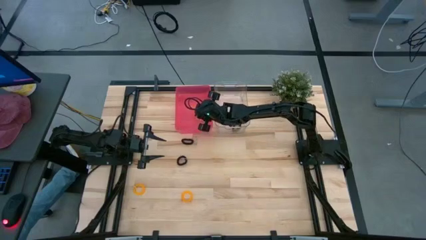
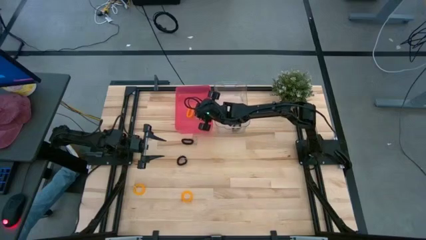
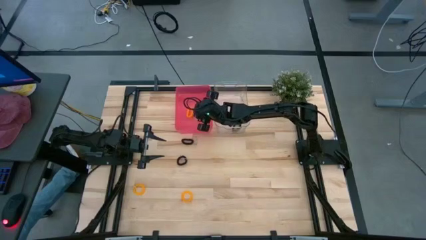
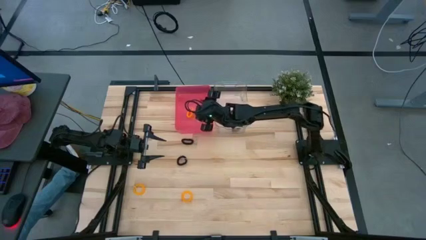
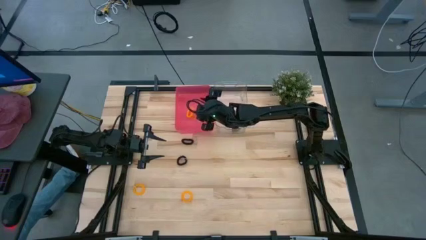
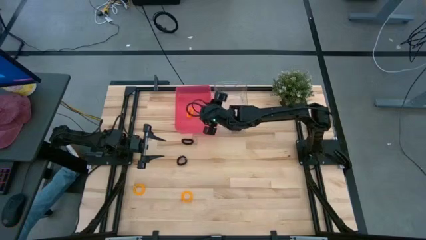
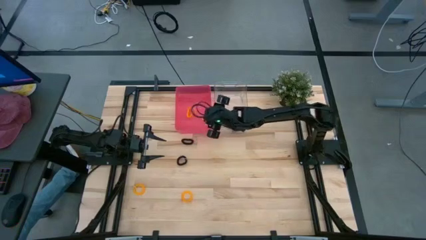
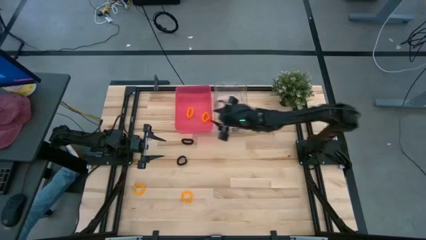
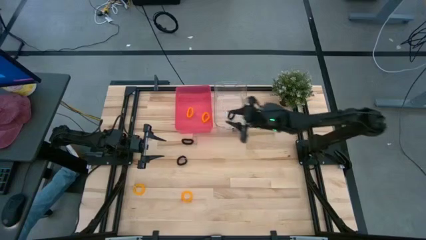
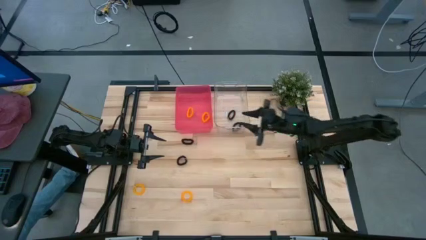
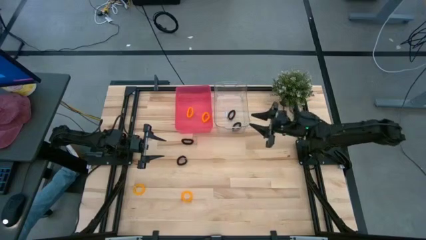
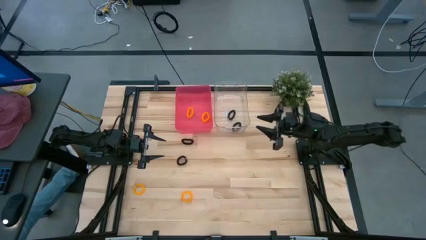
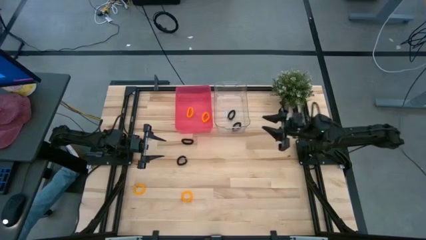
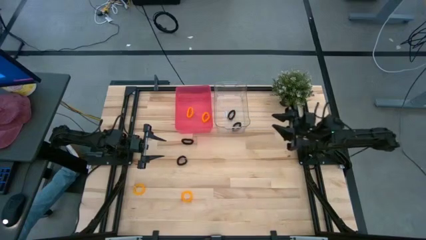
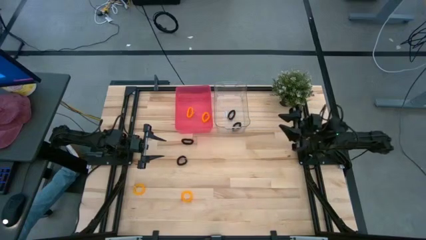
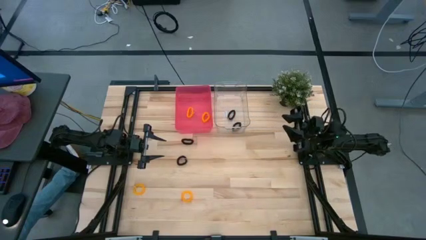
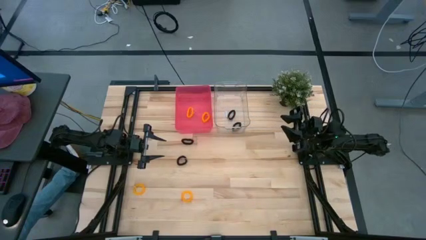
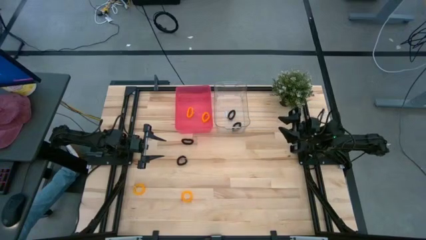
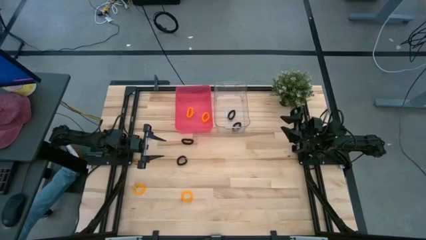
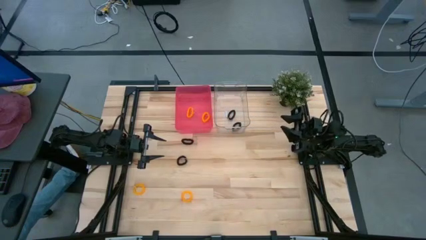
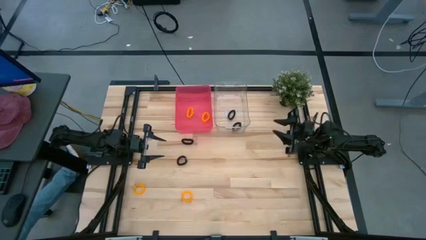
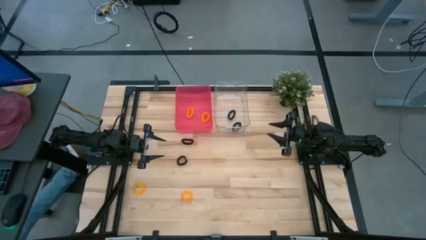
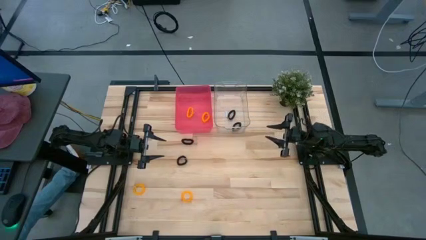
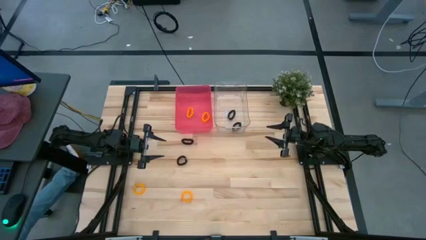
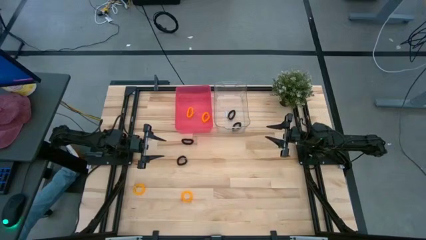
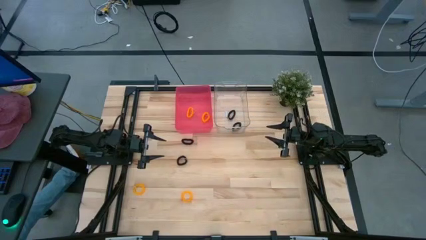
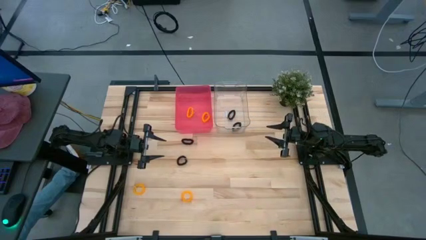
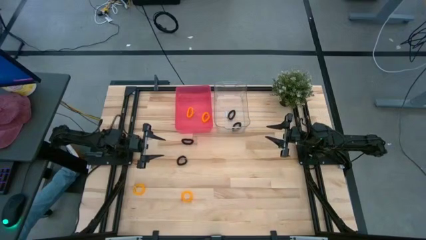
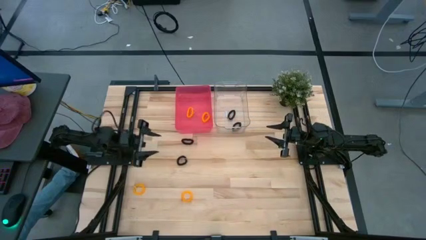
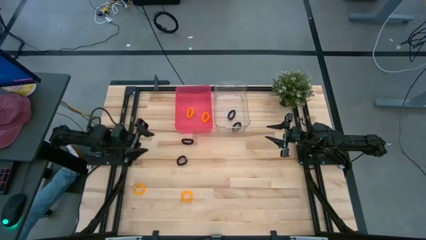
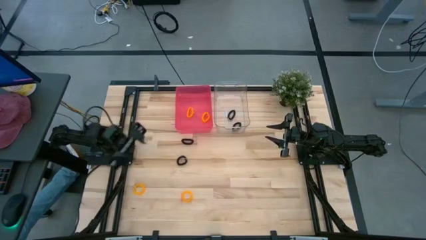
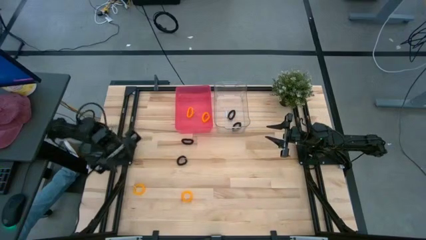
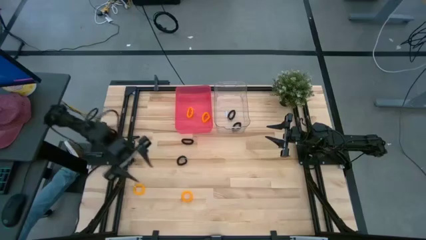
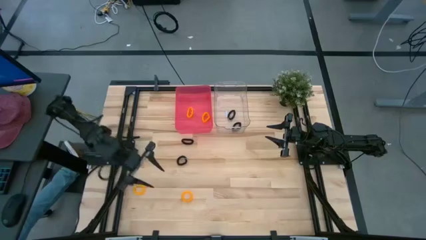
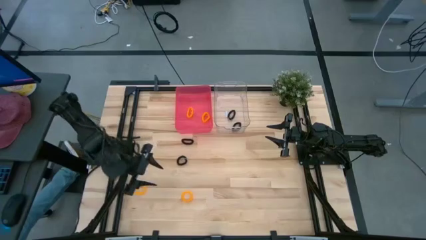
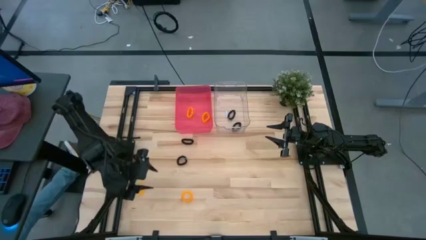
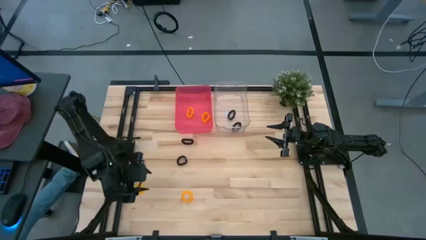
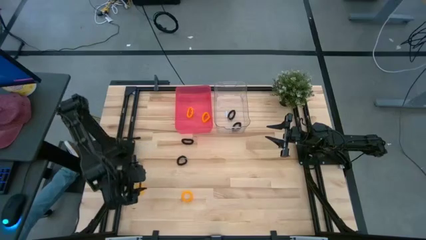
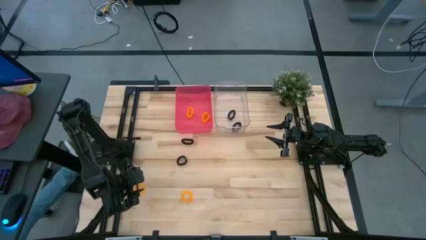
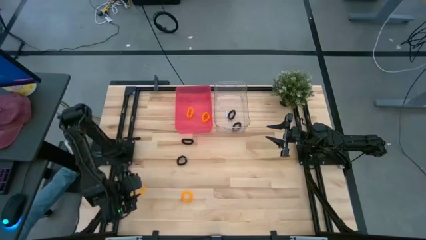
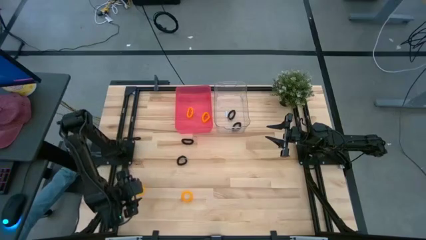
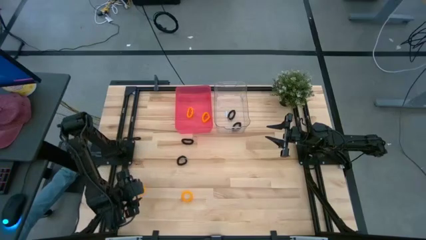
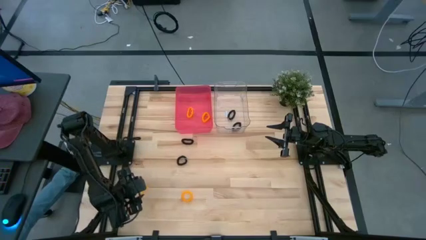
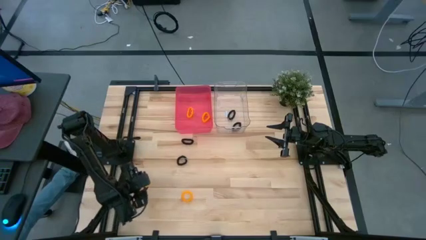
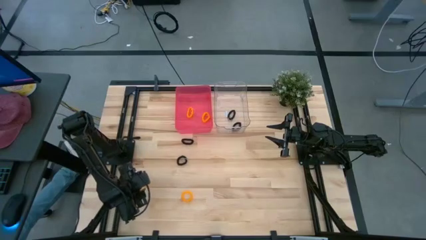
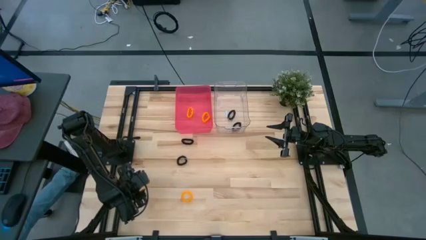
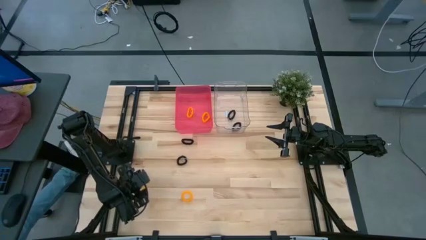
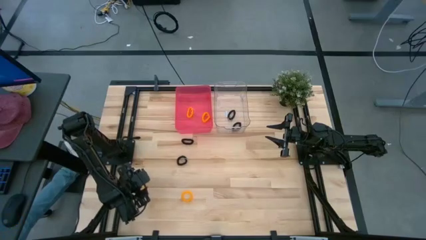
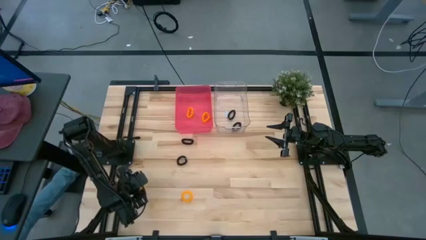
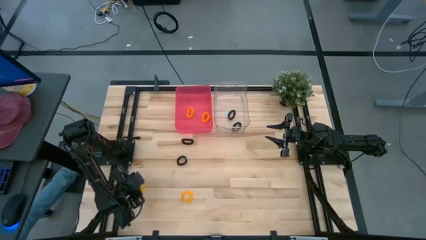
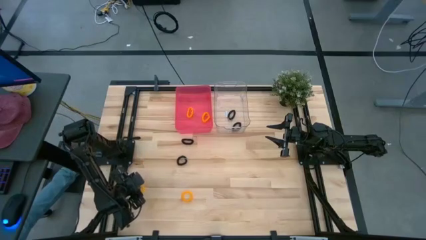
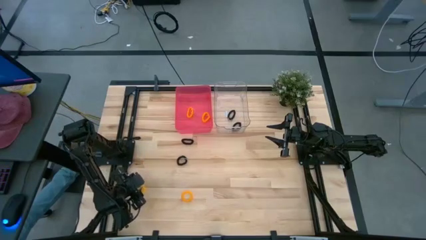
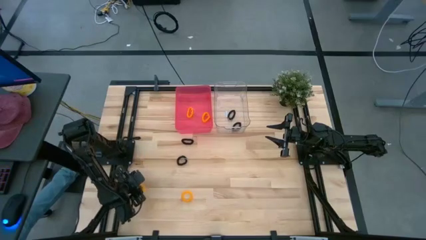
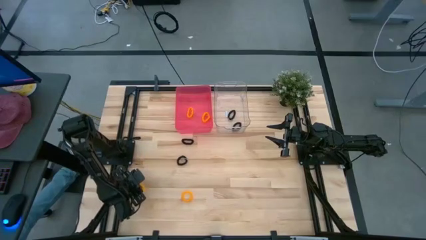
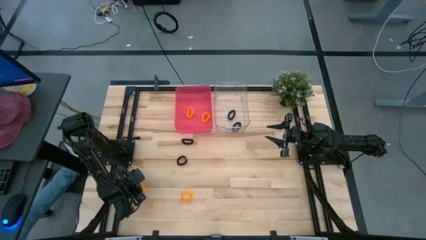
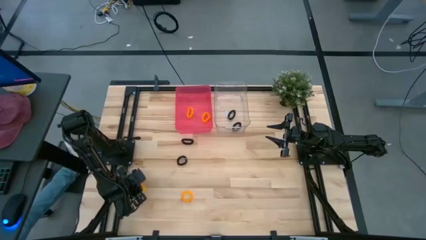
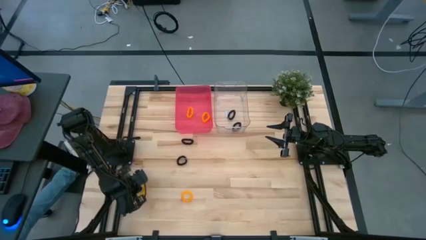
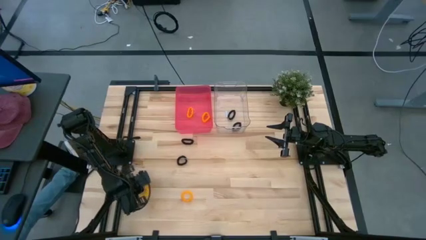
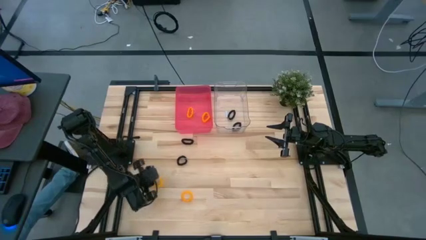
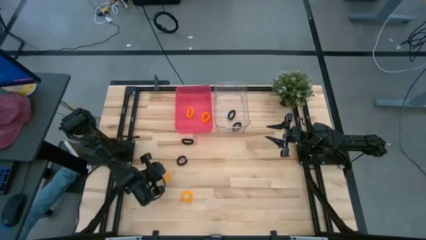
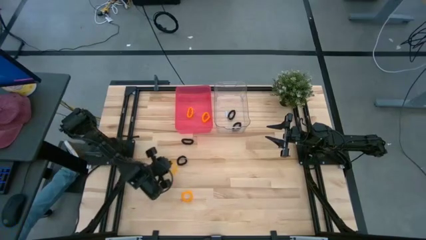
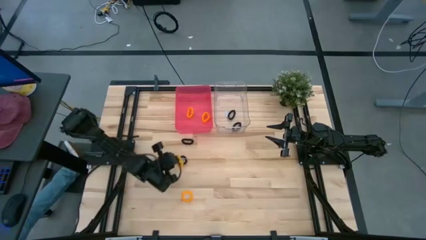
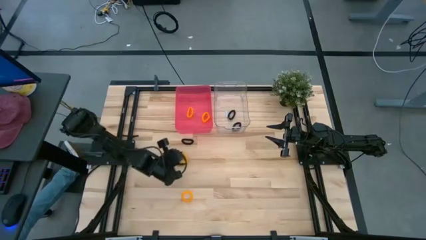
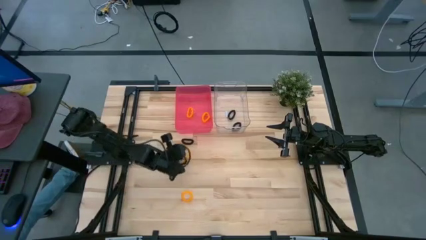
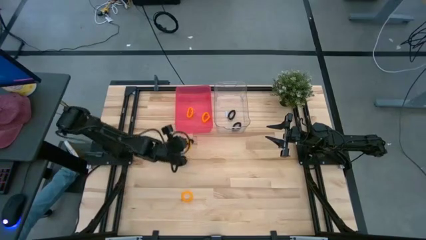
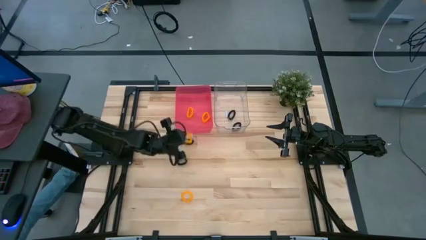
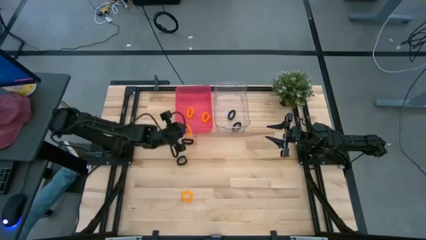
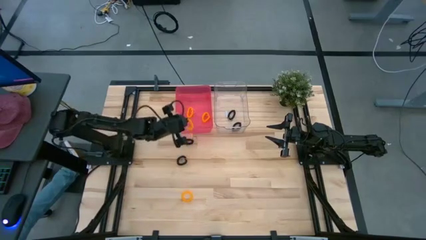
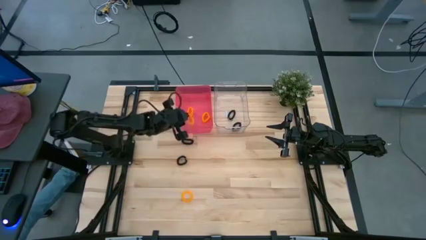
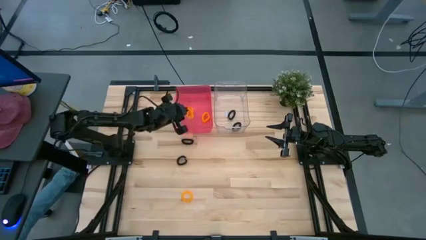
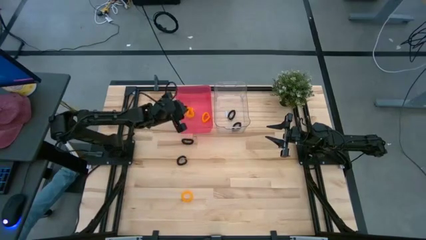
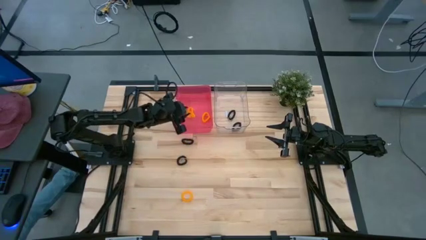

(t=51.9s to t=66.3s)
Task: Sort spring keychains
Put the yellow spring keychain into the red bin
